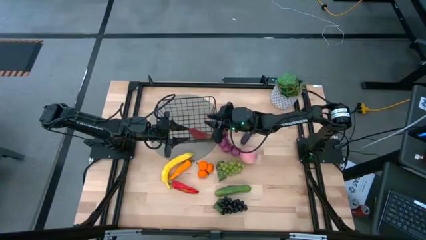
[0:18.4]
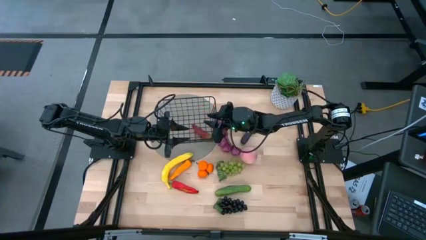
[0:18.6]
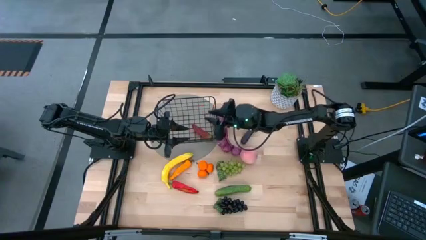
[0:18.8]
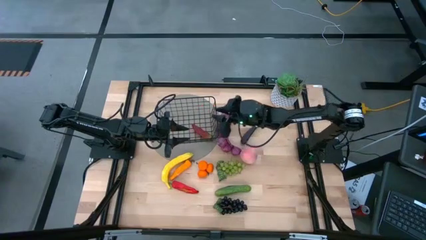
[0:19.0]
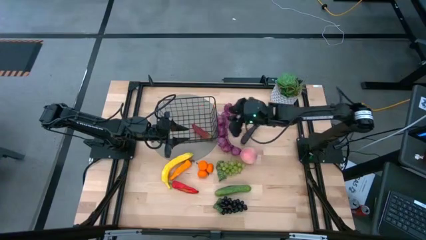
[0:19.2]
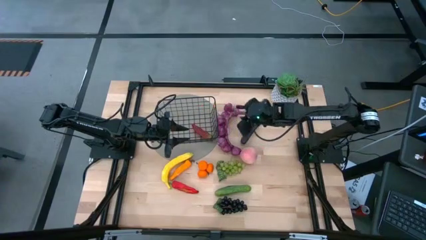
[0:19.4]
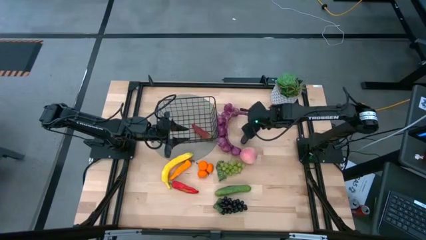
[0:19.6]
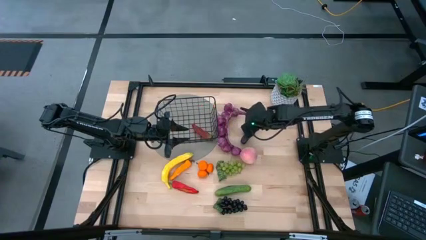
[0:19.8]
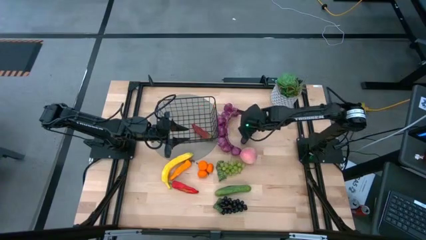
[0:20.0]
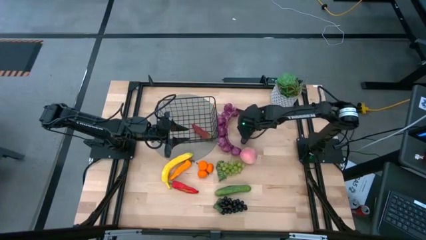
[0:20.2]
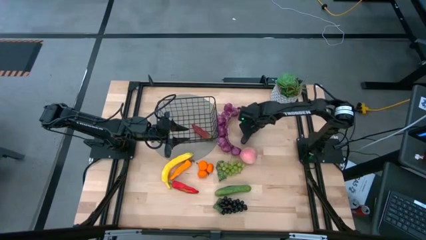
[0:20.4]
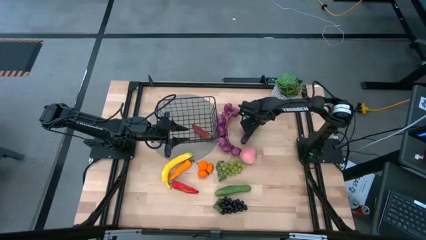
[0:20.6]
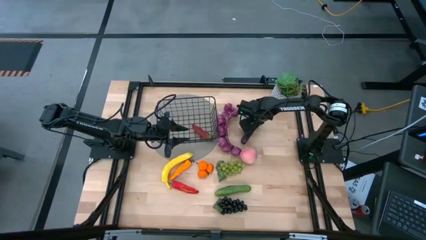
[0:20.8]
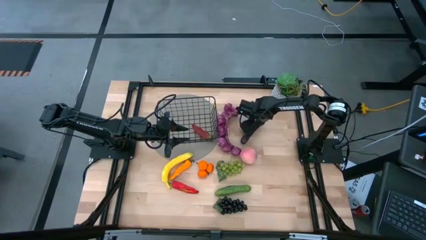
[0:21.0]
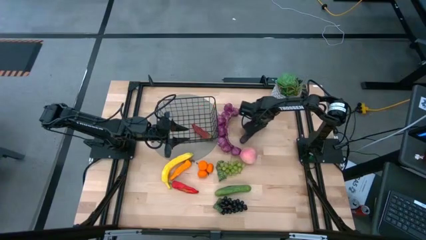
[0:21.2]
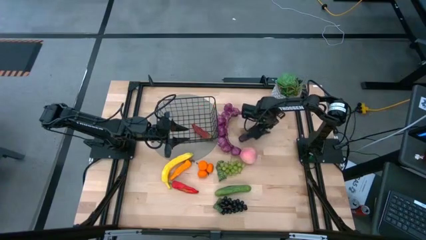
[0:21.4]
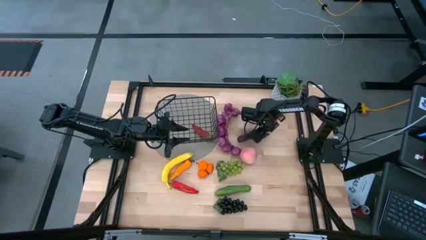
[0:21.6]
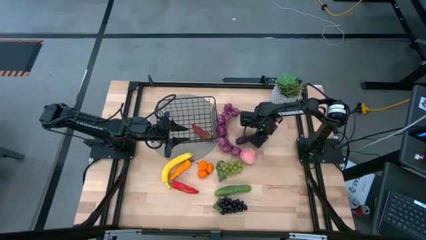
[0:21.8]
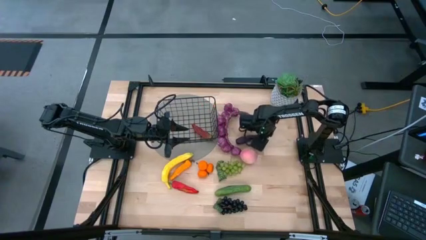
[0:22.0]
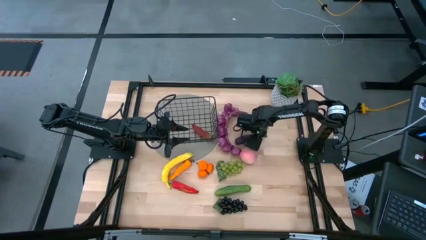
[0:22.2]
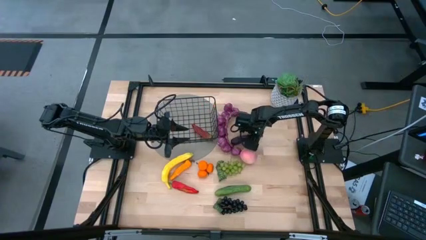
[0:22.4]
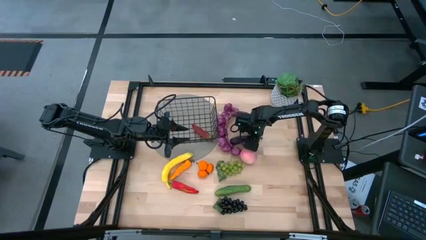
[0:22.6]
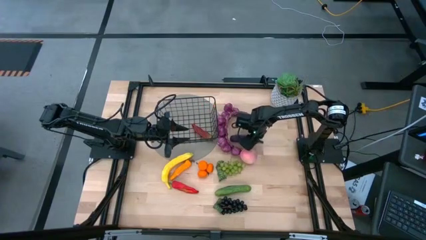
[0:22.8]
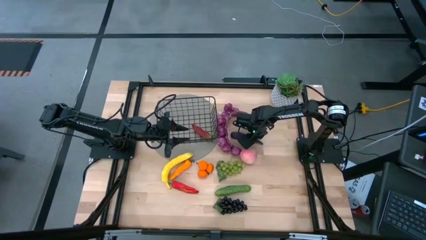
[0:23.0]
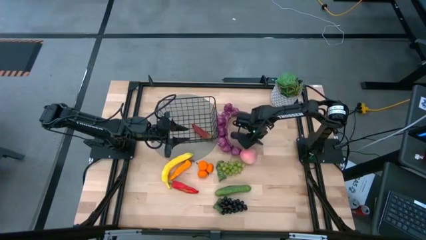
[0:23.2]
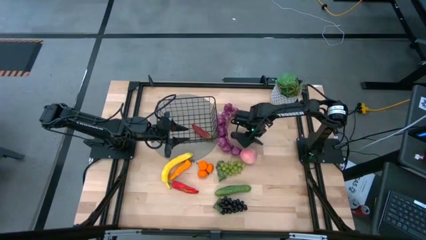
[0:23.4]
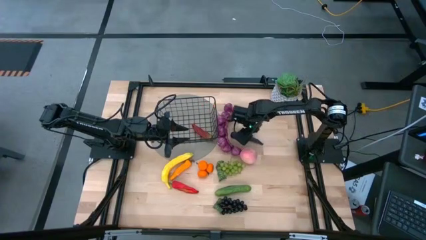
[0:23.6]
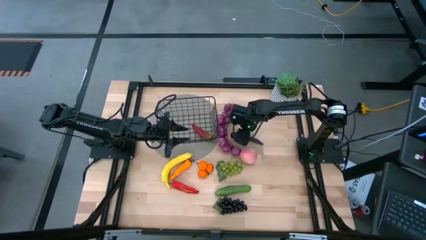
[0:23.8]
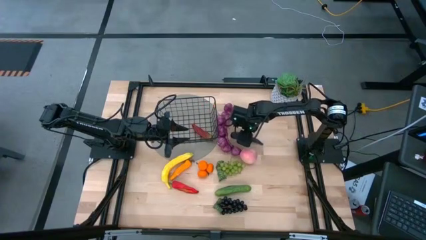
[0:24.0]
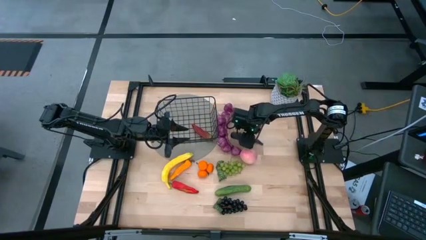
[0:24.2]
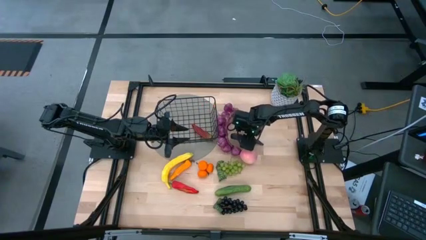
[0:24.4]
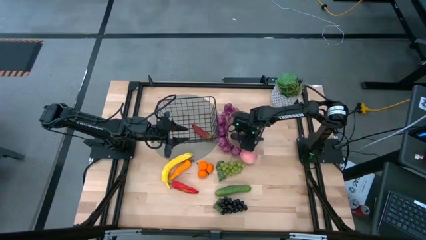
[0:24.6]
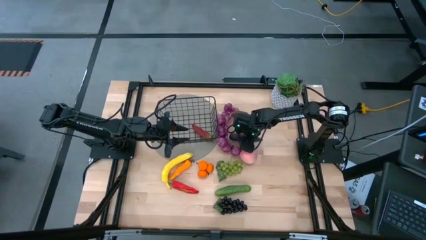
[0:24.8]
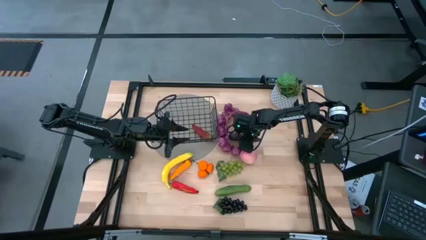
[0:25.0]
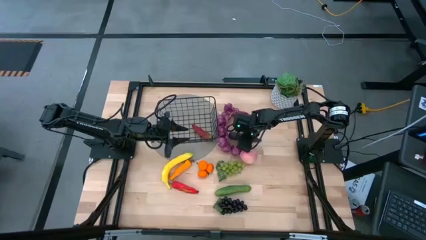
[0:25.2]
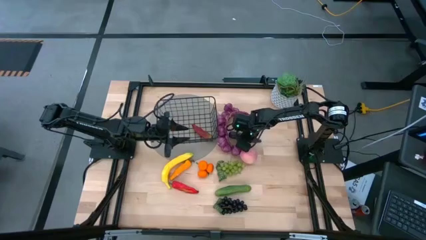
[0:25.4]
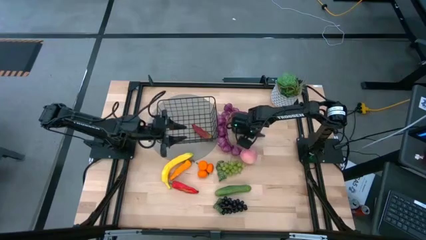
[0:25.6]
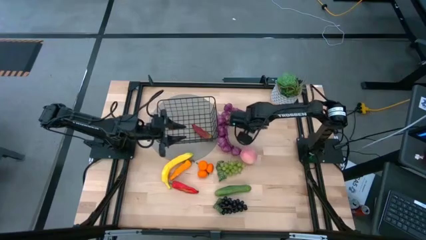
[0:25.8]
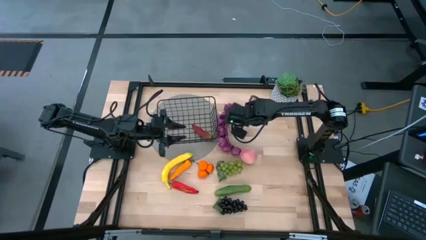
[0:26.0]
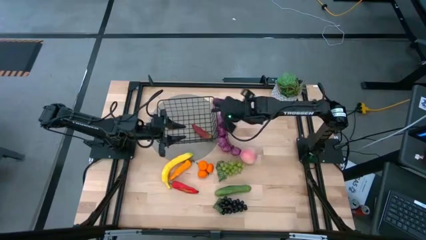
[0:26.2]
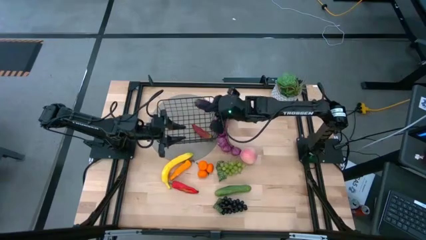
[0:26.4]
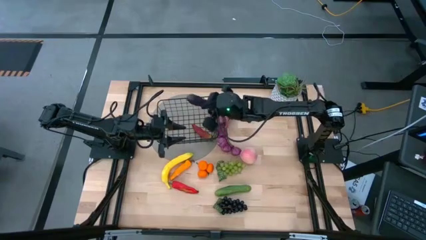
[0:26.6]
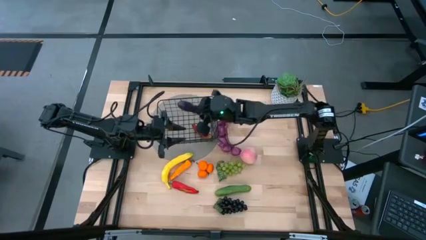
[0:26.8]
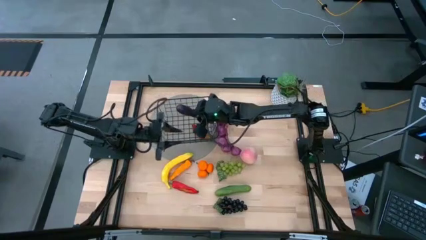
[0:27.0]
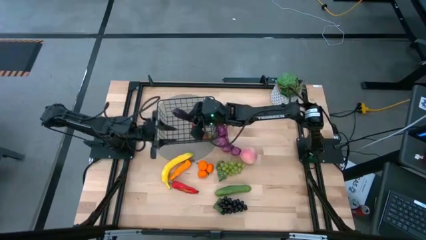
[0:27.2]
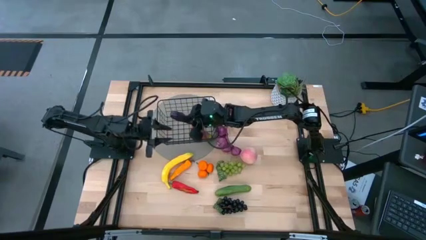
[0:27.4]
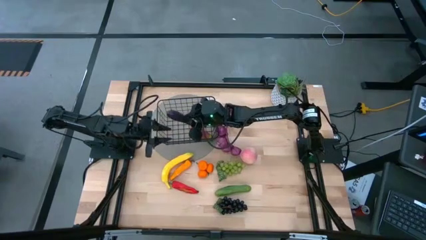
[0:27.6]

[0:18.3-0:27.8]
Task: Build produce basket
Put the eggplant into the wire basket

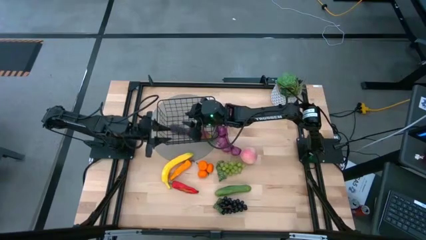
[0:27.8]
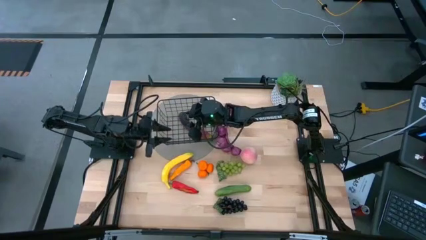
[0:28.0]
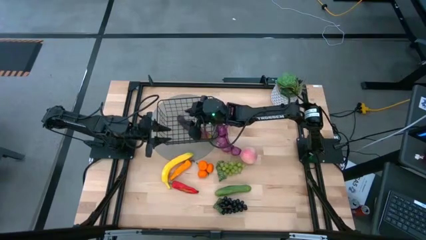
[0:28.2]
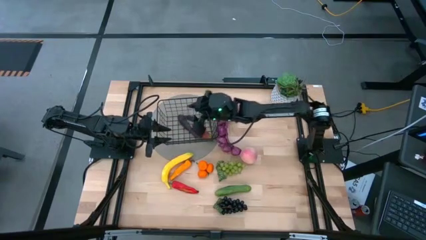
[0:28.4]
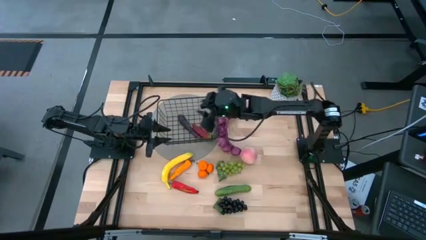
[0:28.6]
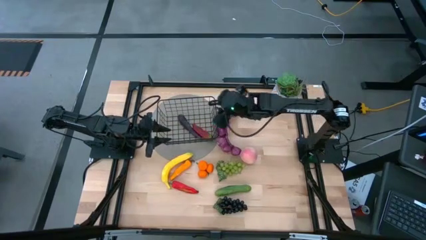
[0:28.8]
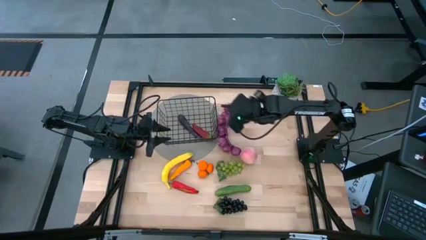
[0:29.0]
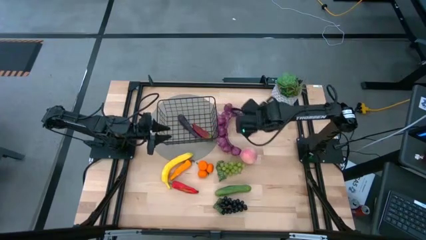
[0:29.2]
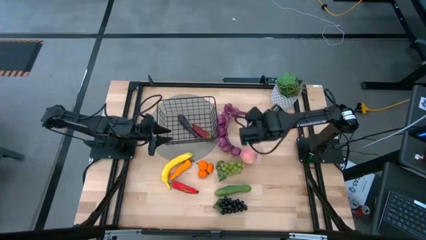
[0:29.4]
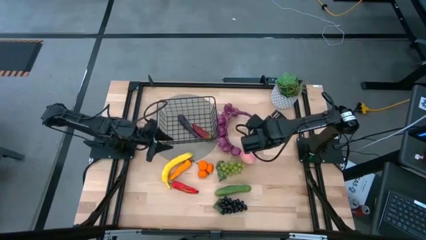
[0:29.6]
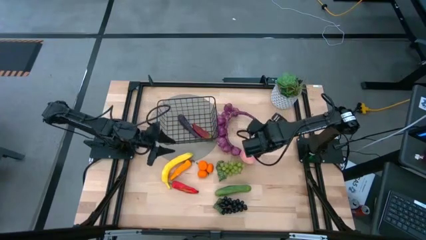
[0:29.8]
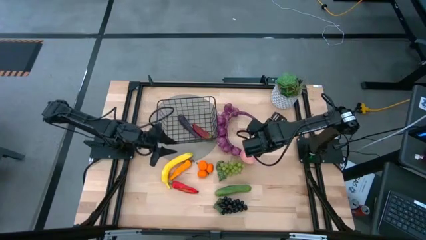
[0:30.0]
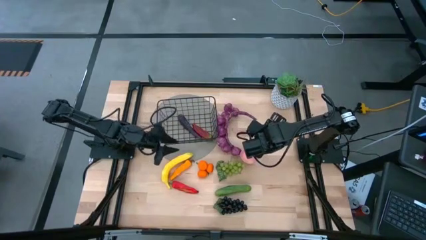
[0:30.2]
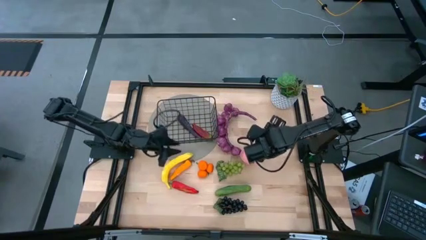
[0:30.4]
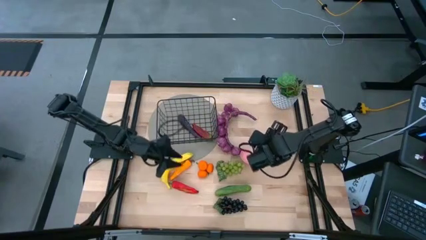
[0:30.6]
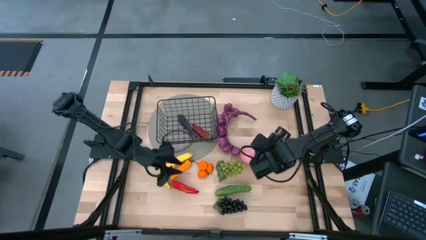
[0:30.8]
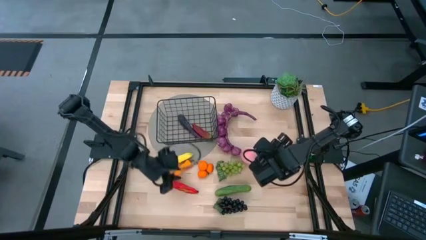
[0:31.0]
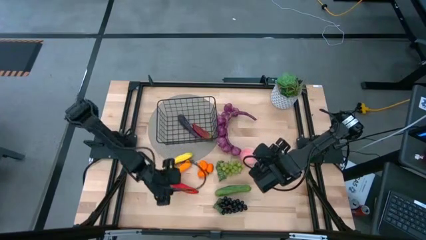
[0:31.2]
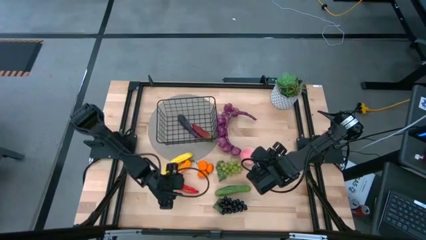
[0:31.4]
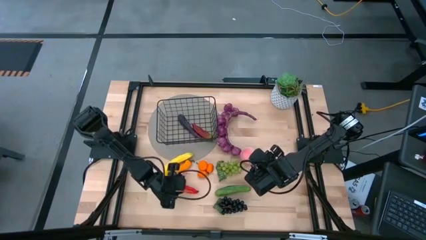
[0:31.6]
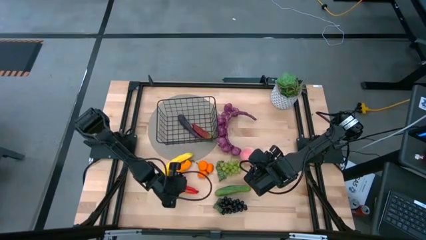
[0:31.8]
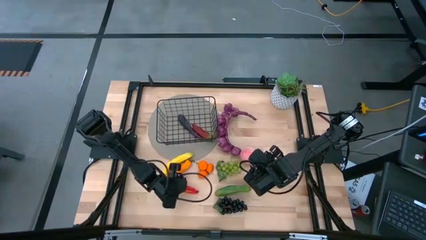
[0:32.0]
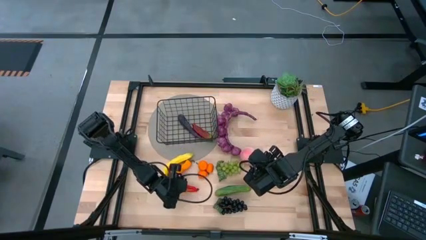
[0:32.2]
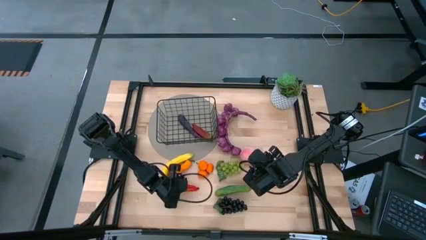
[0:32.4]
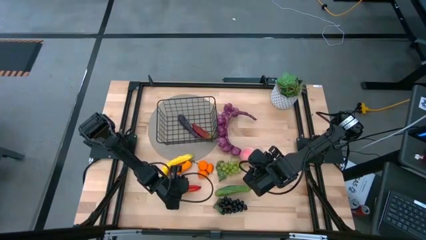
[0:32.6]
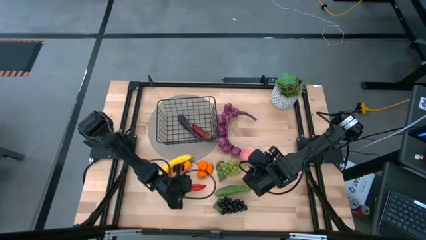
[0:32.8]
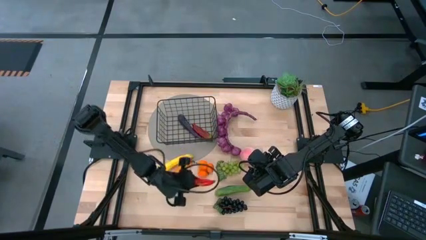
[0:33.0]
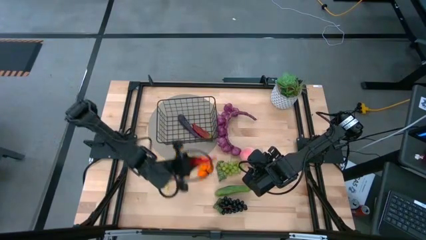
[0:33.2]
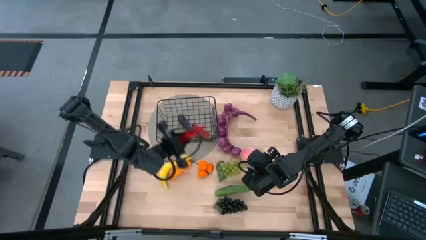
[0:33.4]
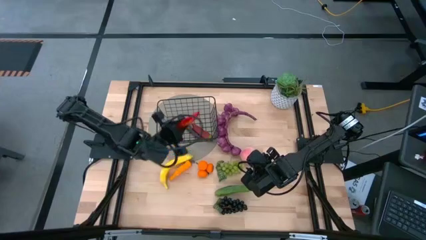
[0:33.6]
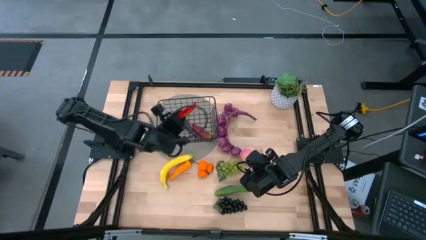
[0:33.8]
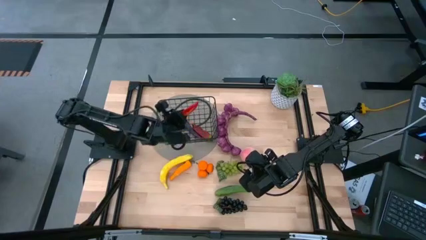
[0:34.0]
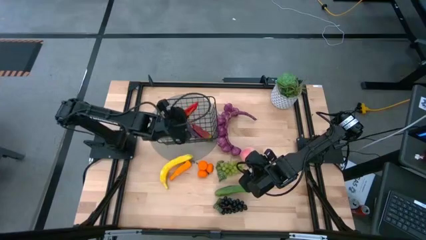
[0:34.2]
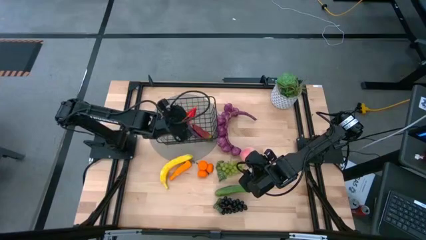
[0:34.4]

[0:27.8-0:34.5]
Put the red chili pepper into the wire basket
